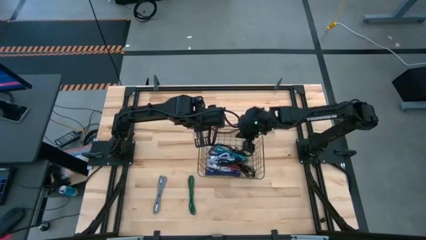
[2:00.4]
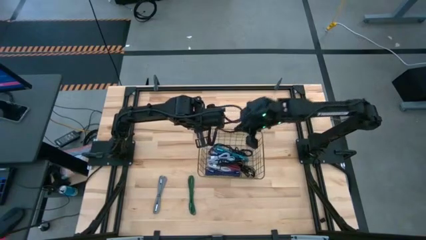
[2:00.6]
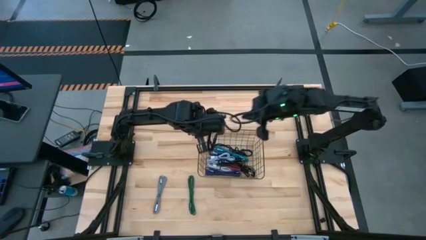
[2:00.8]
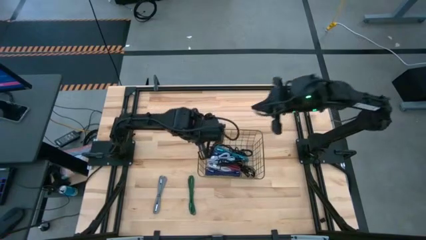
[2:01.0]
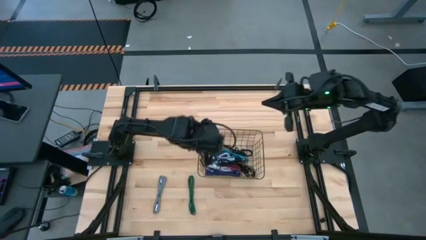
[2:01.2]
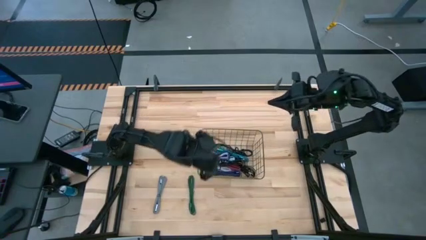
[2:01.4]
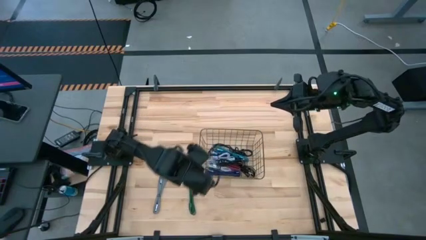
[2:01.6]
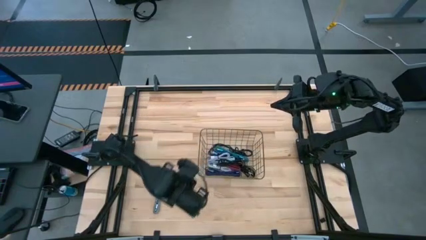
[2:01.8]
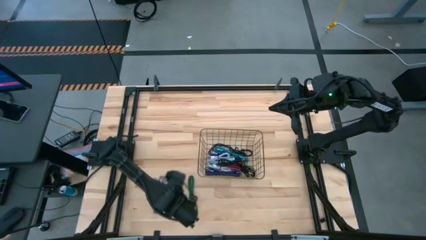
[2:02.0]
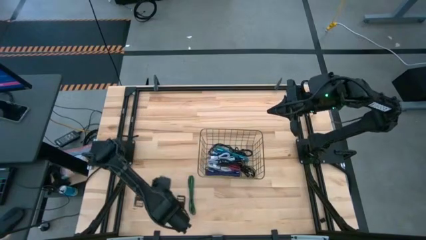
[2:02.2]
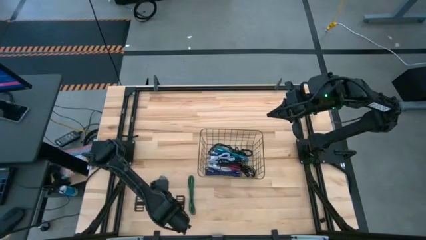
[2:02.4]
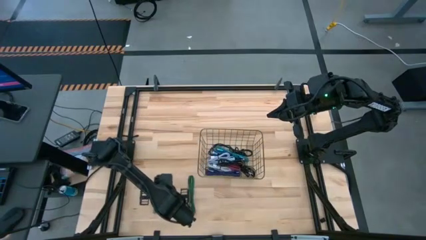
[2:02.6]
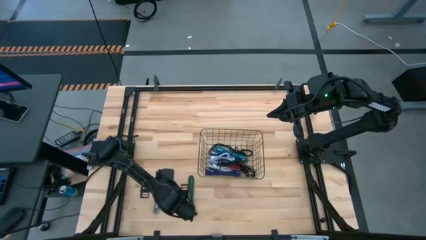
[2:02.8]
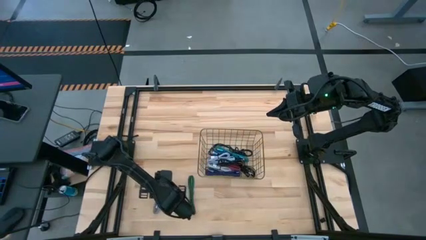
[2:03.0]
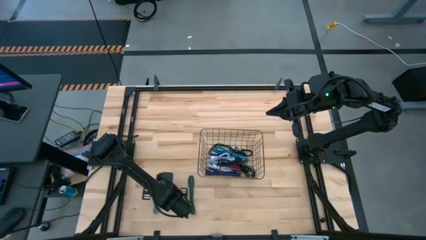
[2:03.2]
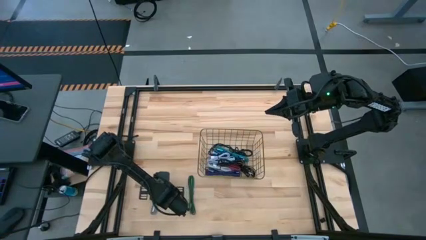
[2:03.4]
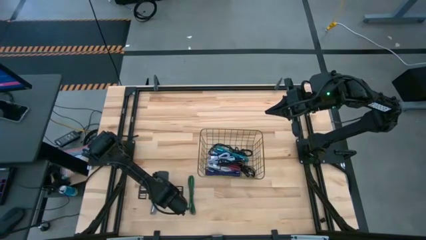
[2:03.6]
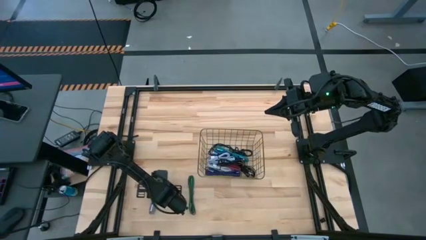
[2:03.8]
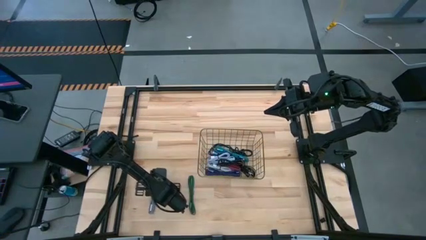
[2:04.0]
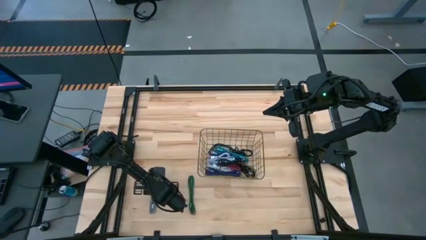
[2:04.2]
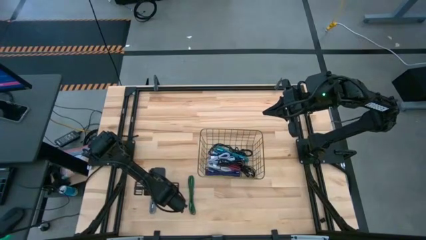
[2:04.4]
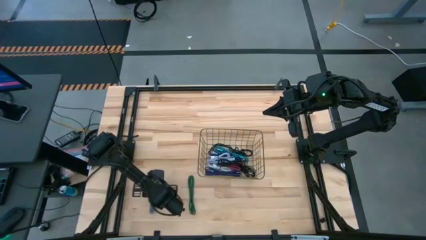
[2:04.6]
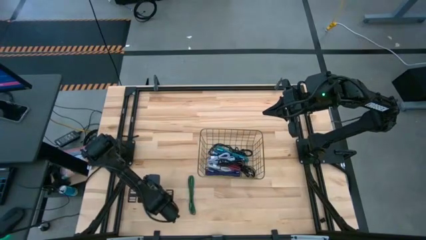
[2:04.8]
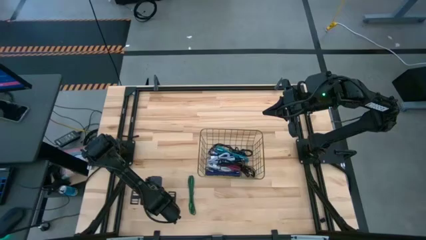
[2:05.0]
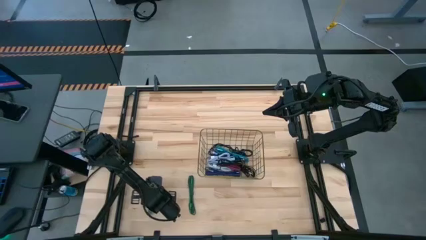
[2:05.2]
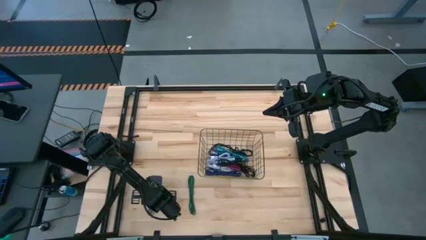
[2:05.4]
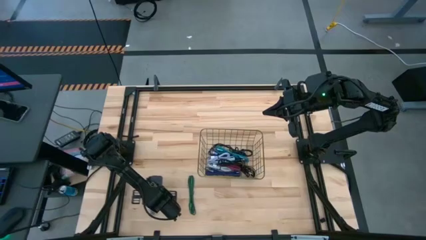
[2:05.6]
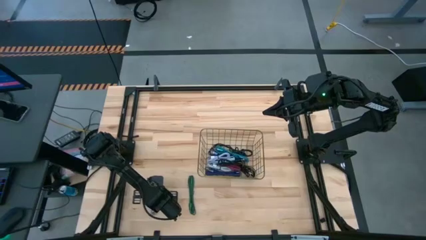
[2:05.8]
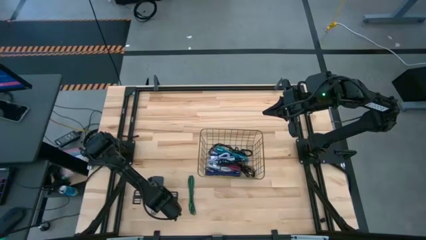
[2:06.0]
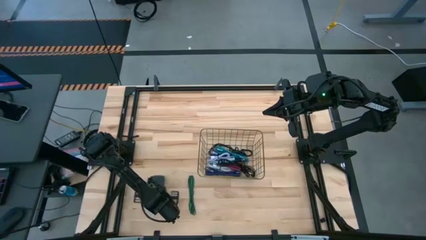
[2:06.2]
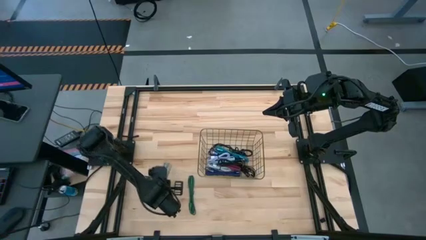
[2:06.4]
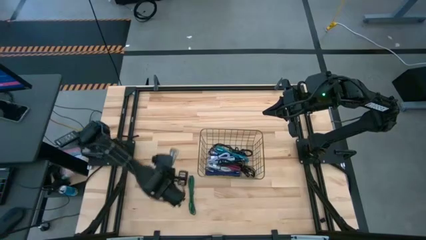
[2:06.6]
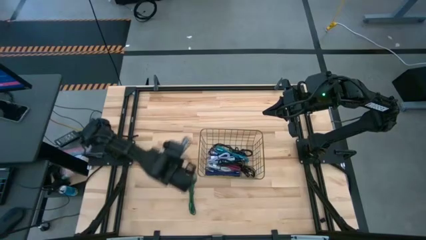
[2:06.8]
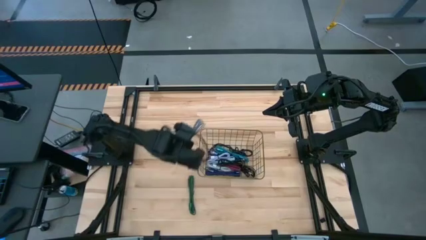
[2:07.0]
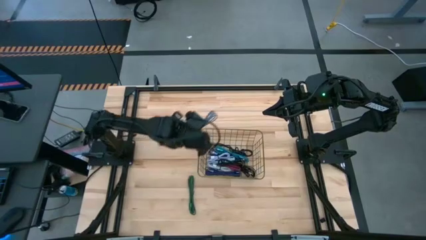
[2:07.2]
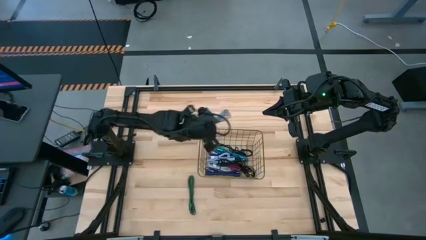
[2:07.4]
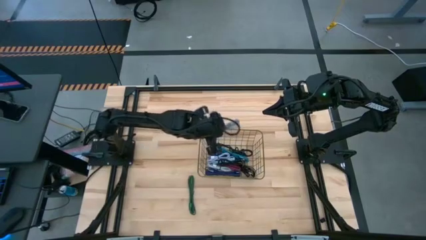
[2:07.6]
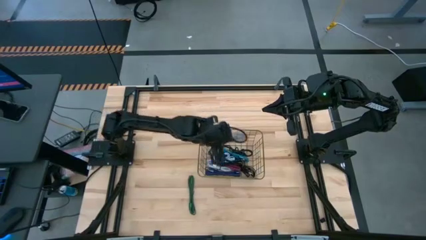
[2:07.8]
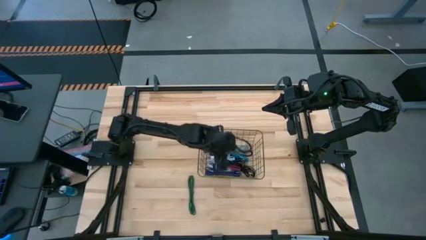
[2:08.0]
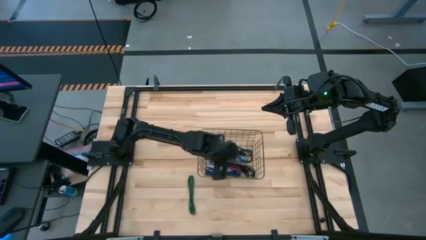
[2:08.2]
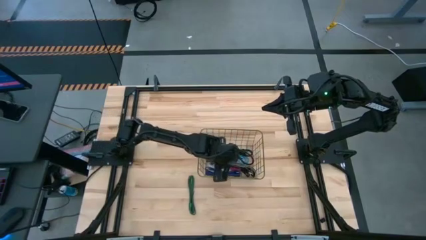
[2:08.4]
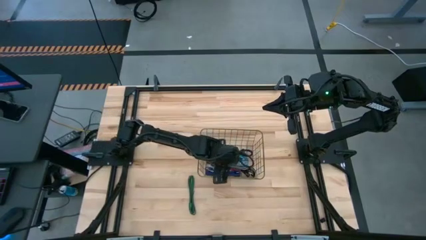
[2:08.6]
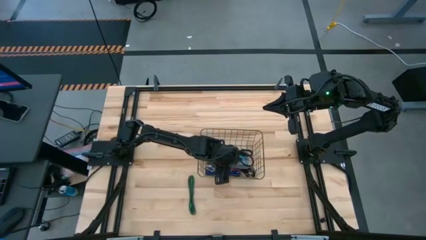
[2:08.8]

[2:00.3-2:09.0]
Task: Pick and place USB-C Cables
Put the black white charger cable into the wire basket

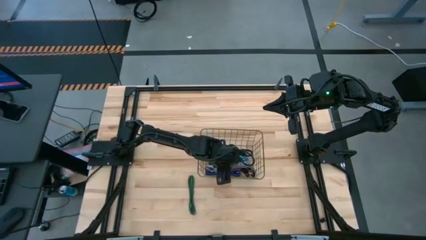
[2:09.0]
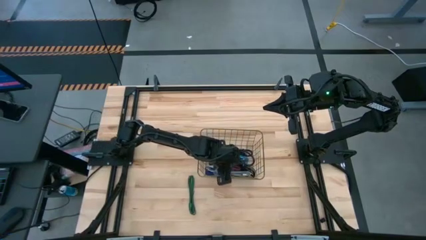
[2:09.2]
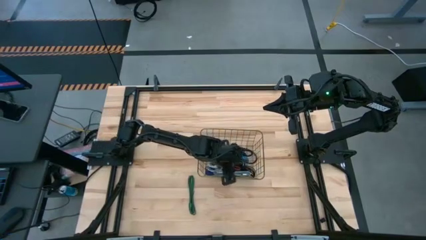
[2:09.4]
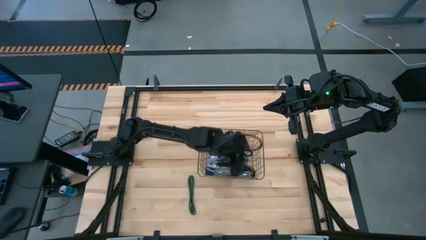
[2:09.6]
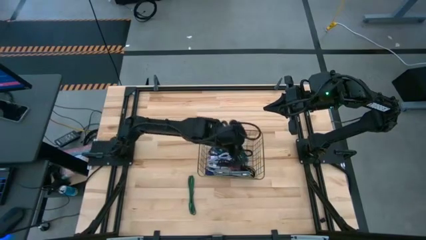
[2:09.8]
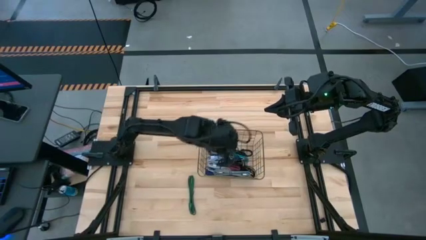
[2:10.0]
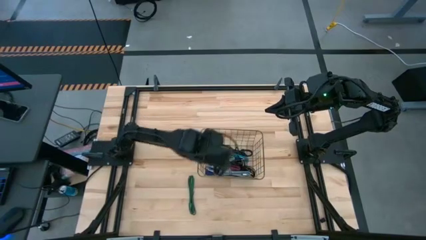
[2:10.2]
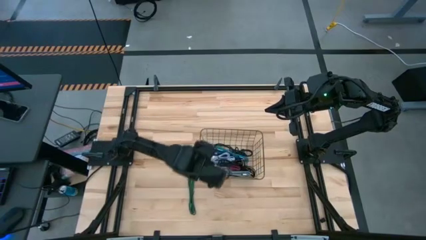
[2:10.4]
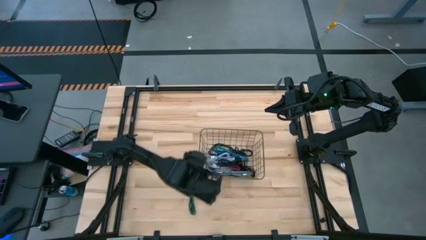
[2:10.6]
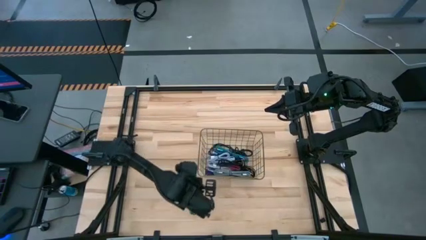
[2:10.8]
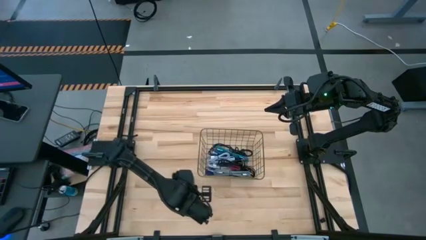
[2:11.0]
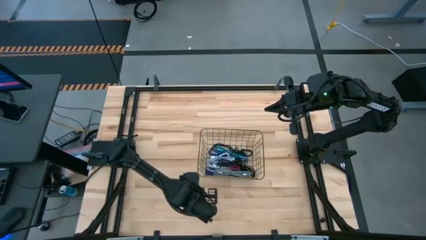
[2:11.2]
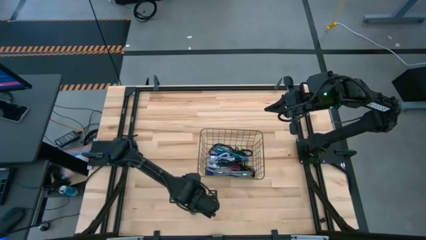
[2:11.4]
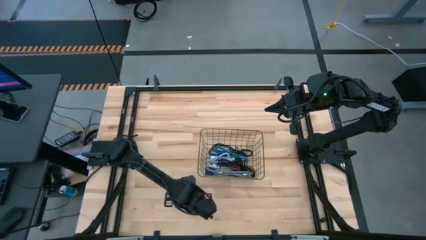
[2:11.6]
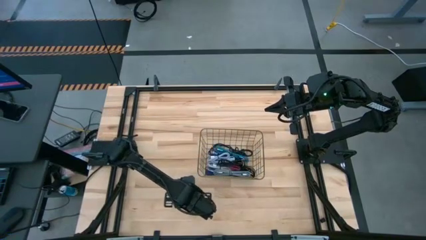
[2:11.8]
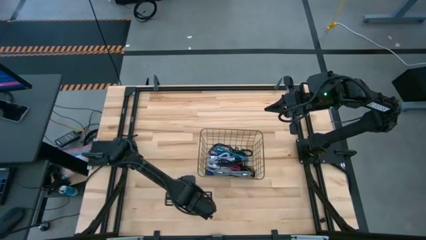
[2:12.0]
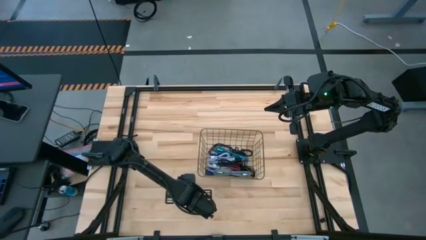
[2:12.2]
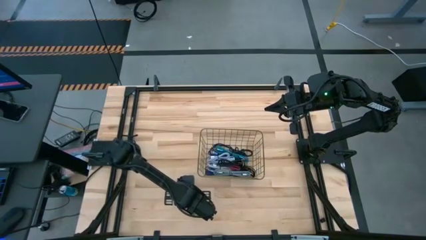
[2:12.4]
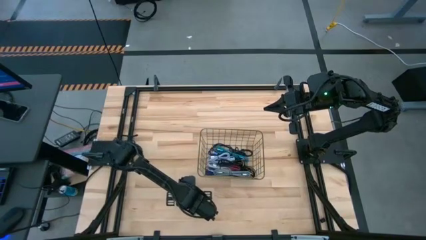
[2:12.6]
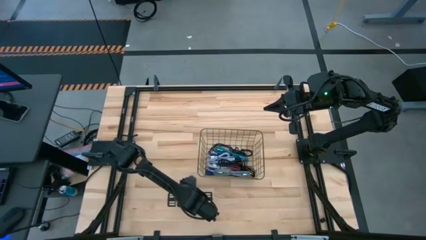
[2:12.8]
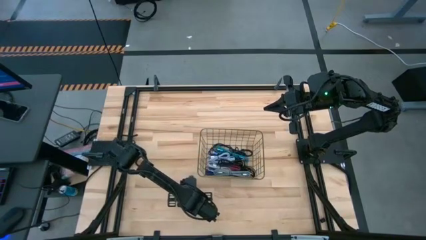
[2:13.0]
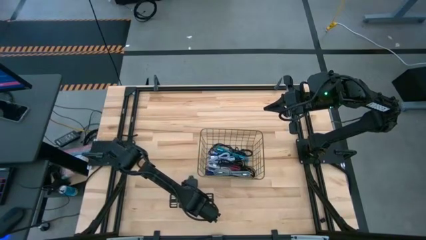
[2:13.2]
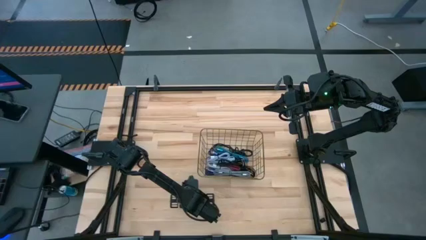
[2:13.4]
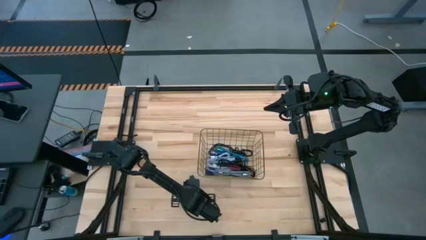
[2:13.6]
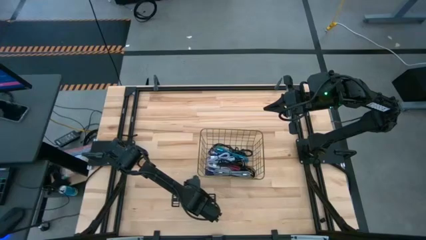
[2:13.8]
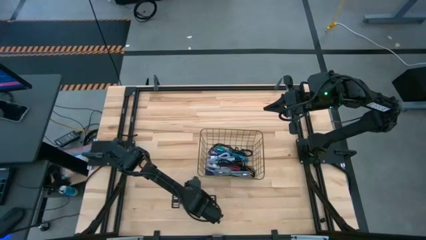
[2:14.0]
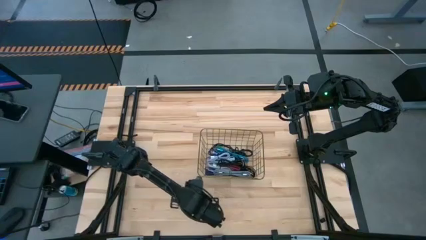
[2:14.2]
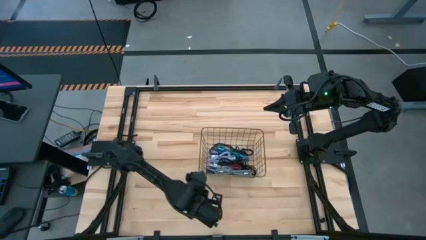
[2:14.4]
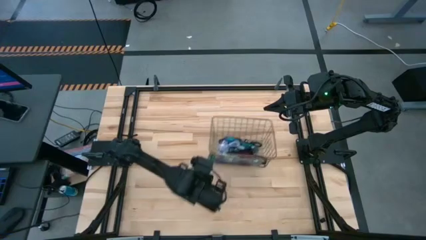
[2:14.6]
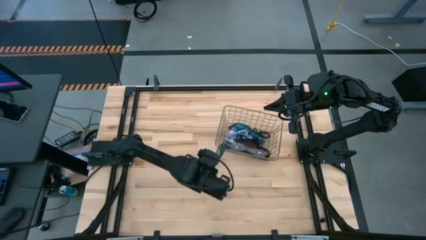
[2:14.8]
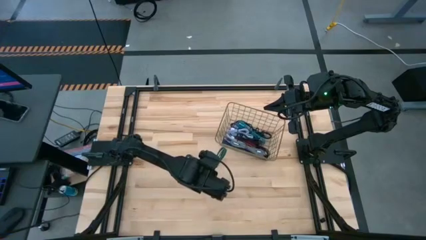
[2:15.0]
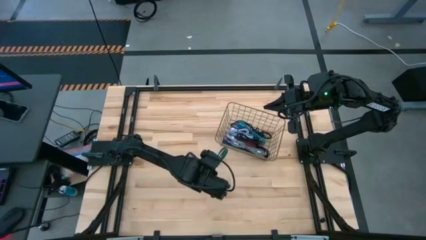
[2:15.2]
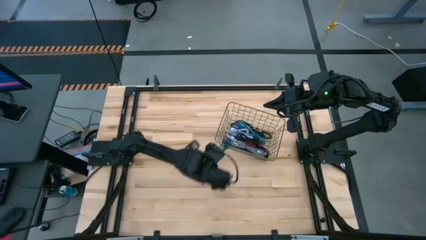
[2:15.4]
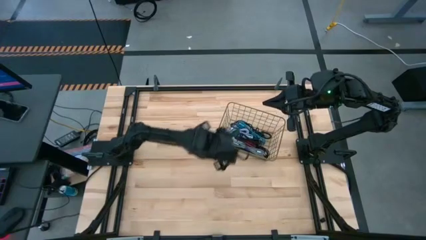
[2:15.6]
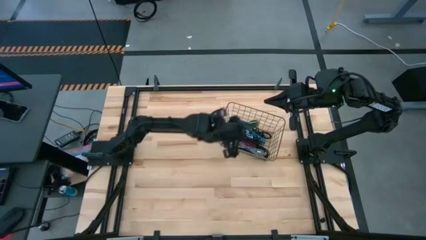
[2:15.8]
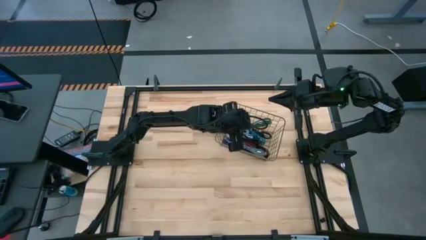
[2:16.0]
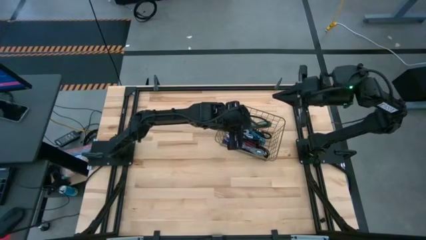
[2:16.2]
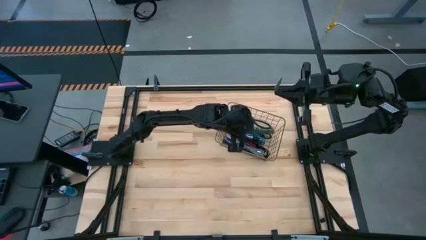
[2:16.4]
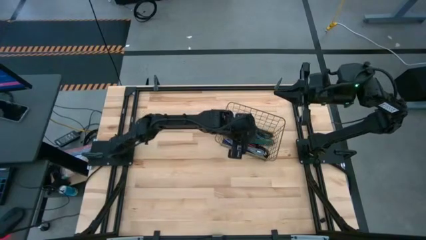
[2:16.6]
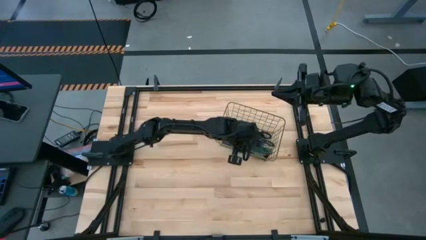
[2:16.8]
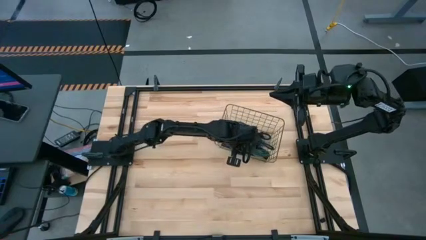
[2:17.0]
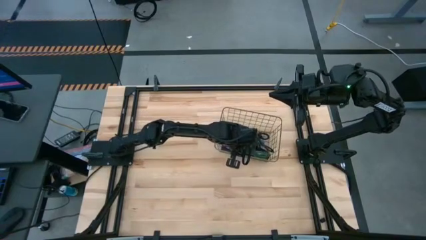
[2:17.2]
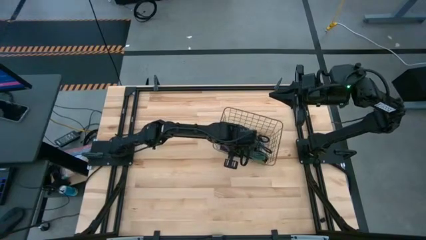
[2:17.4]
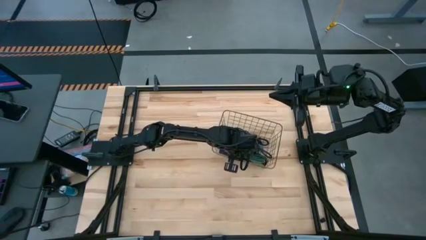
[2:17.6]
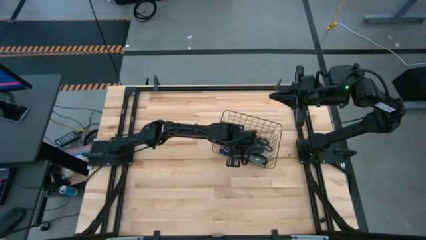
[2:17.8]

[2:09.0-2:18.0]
Put the black green charger cable into the wire basket
